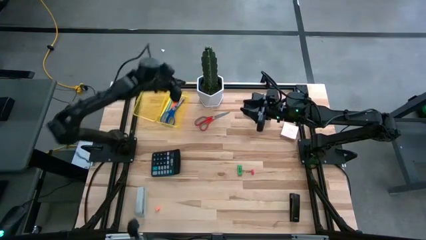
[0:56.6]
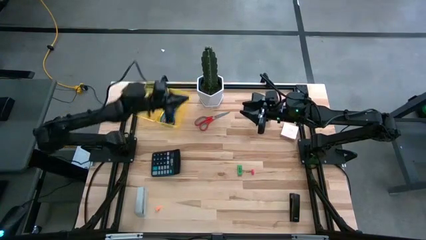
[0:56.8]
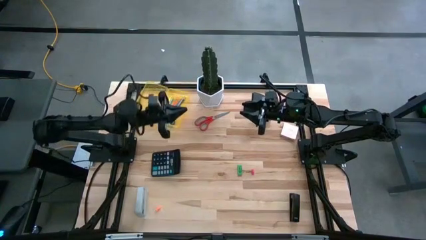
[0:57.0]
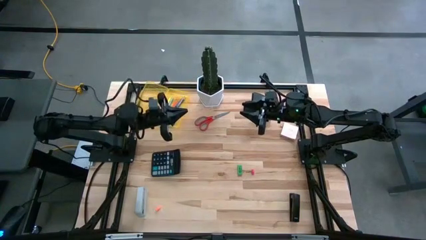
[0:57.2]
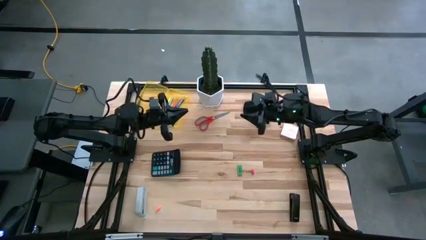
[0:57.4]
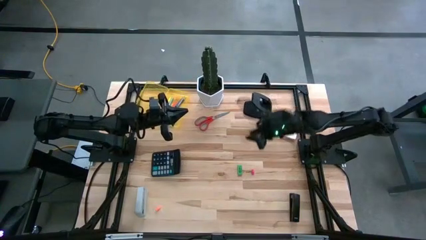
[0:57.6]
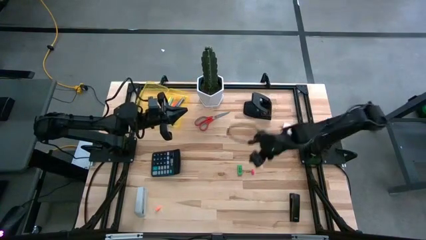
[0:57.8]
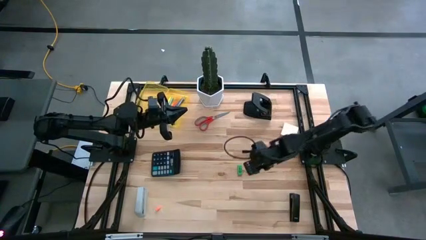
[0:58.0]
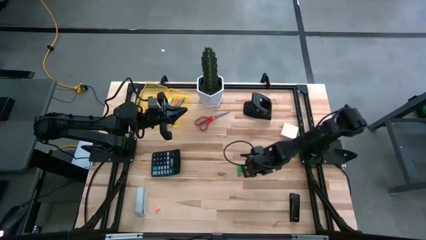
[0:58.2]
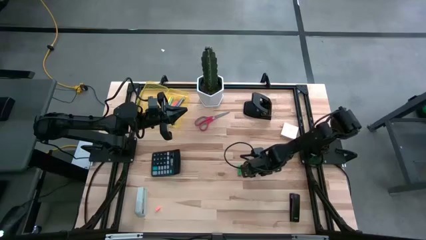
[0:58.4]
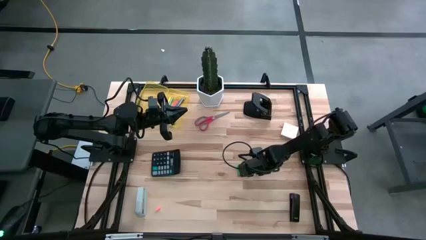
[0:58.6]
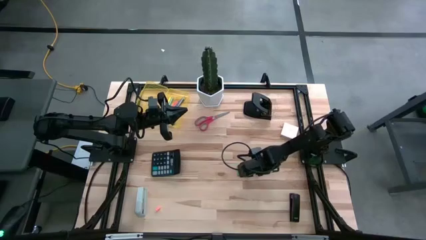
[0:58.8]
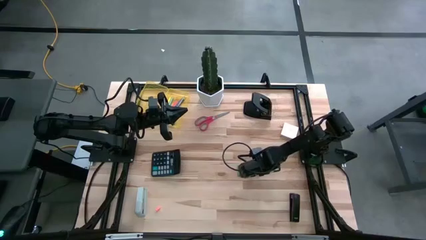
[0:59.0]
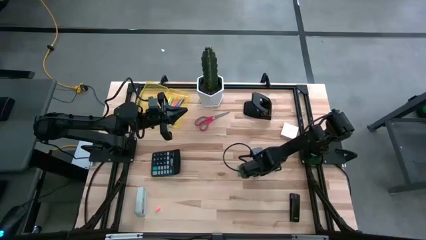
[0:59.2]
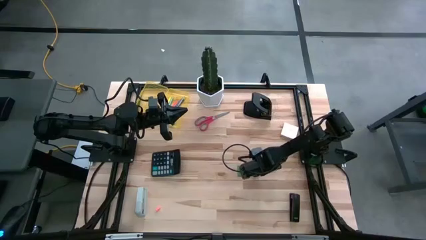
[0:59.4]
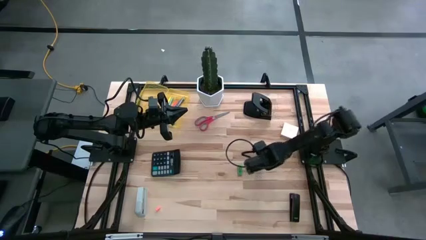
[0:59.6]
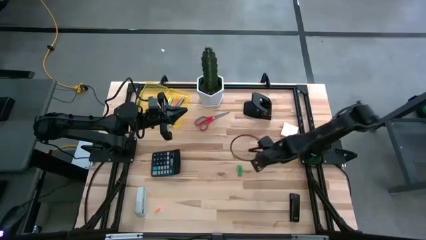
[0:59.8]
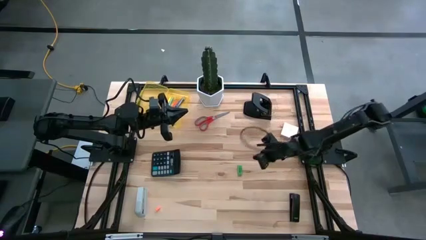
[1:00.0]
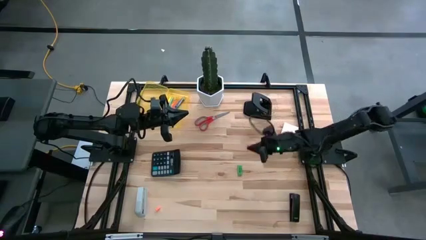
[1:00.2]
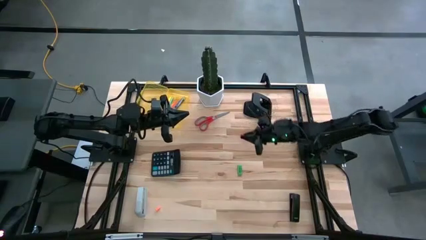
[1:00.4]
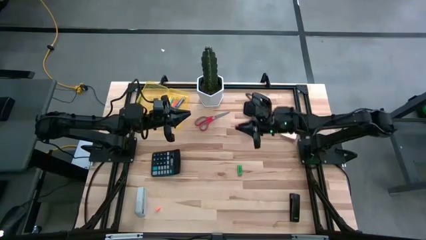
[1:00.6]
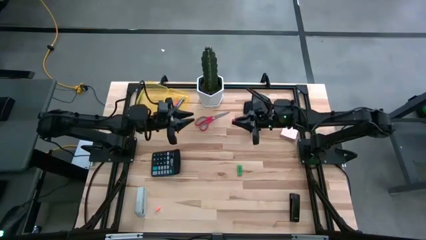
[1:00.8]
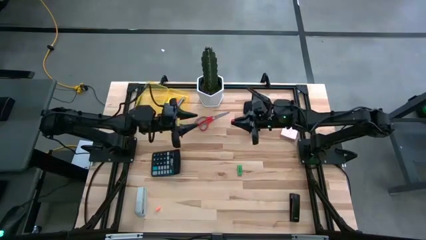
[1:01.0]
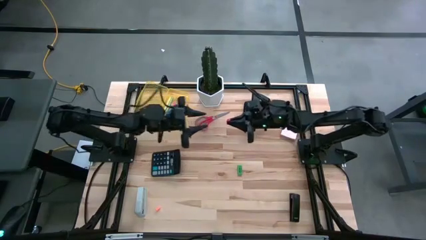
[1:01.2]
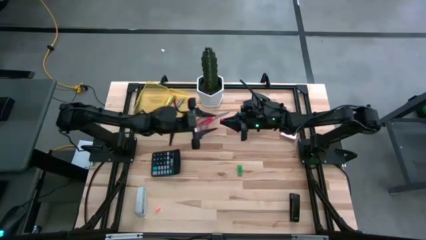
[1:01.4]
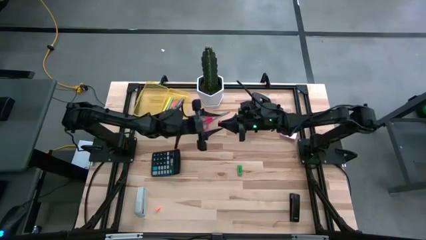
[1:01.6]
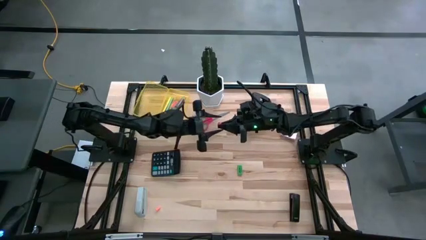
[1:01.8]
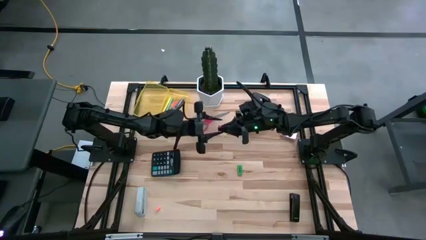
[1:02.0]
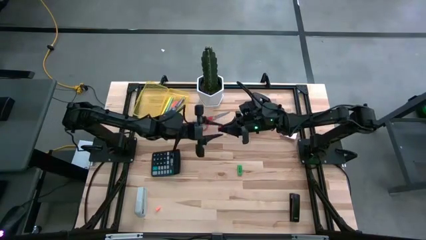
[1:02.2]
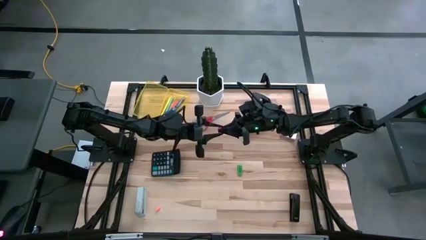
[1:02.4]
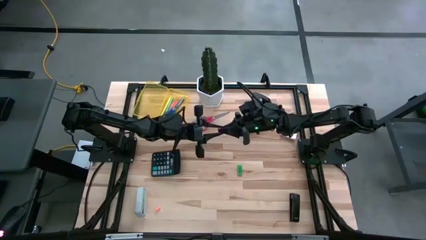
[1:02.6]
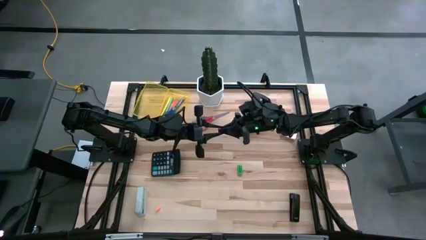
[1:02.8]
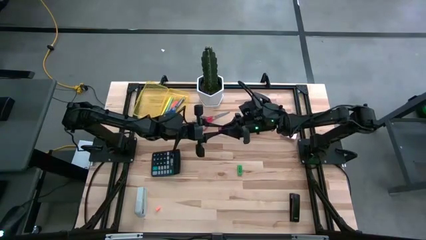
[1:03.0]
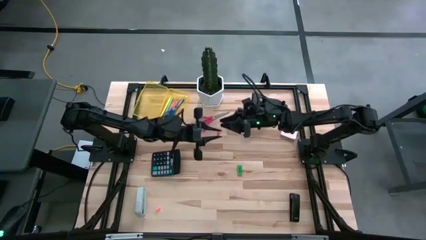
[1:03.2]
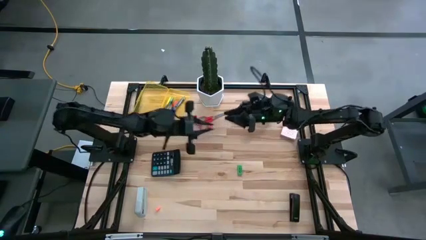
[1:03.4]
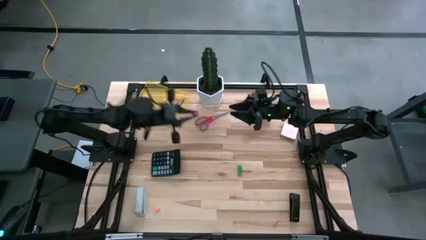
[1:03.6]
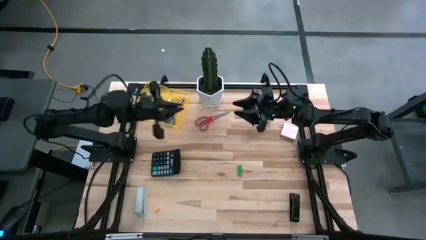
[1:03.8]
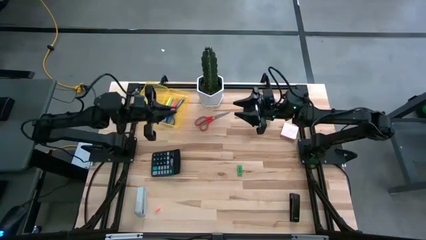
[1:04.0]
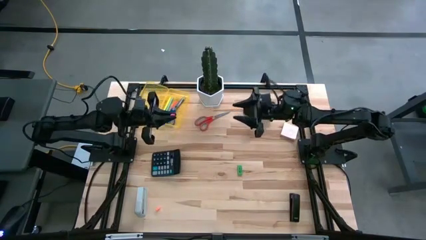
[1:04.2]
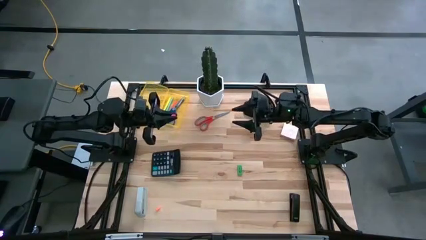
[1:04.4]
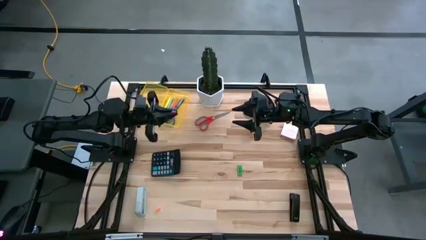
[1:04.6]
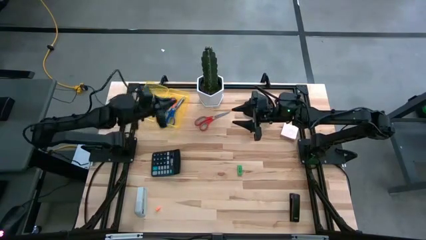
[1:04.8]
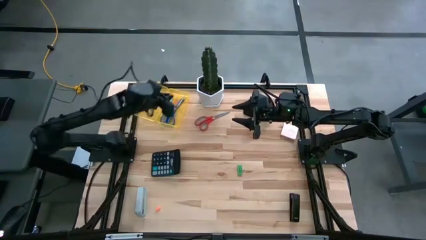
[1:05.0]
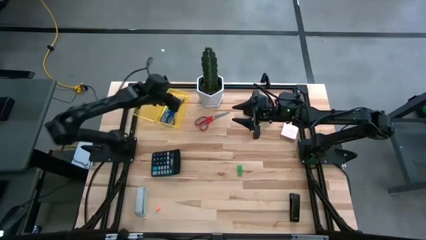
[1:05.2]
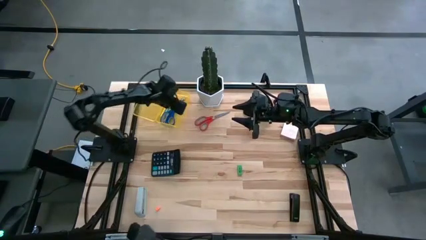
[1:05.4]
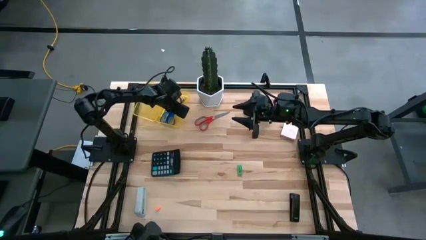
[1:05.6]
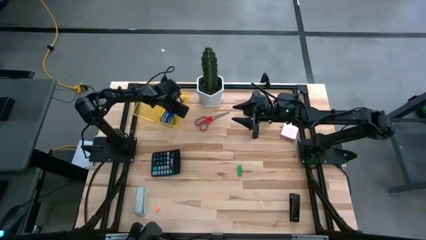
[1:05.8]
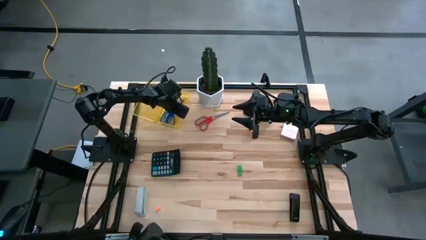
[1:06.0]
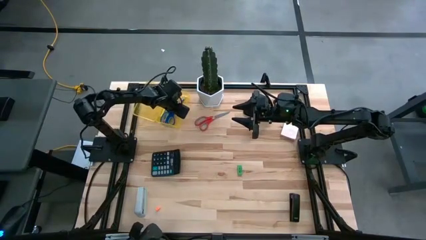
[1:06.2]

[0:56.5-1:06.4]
Task: Pack school essentials
Put the pink cap eraser into the transparent yellow supply box

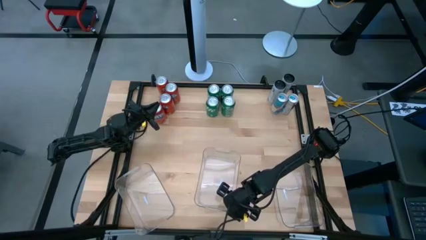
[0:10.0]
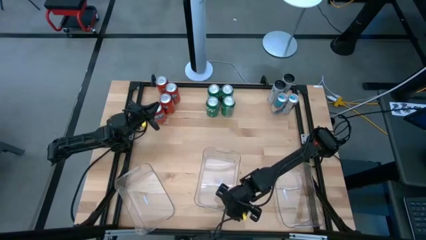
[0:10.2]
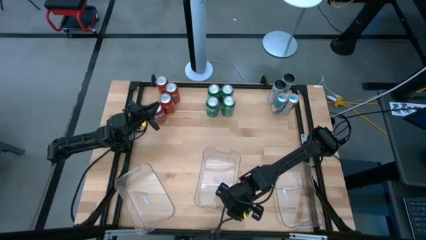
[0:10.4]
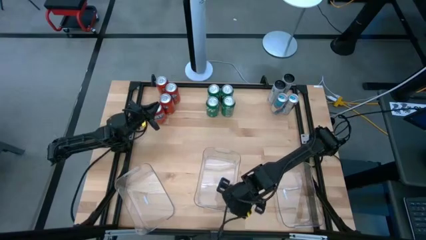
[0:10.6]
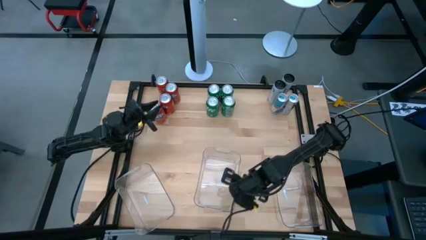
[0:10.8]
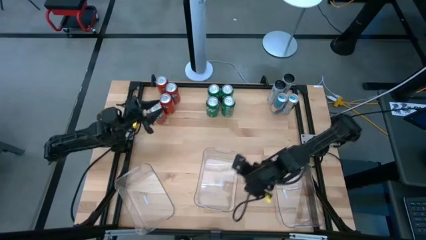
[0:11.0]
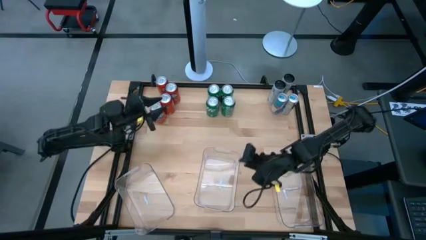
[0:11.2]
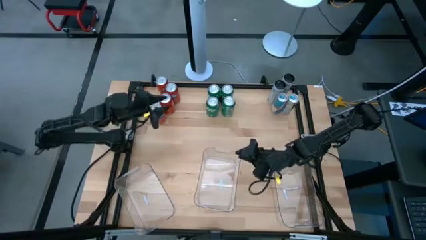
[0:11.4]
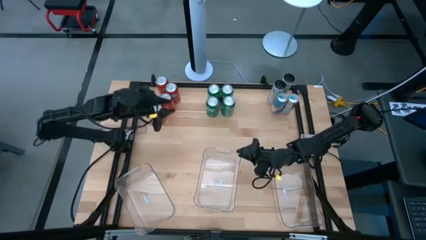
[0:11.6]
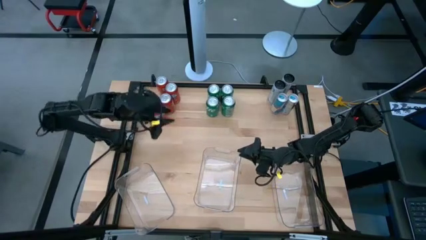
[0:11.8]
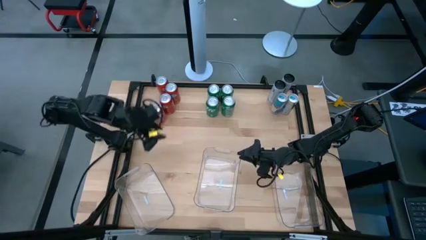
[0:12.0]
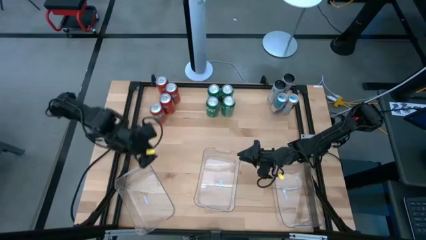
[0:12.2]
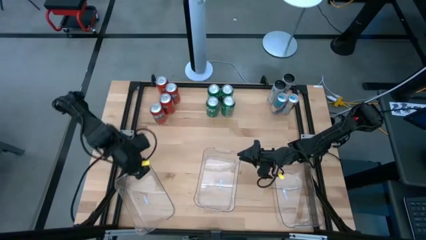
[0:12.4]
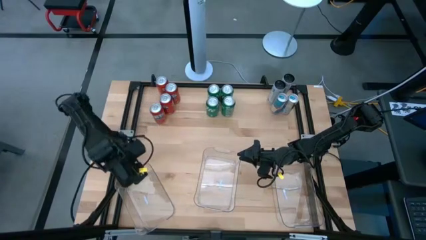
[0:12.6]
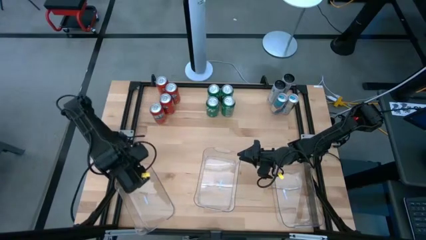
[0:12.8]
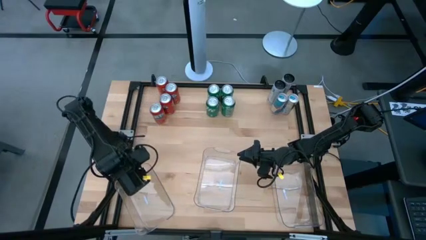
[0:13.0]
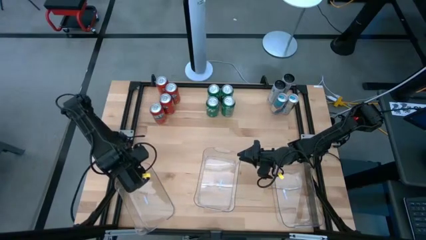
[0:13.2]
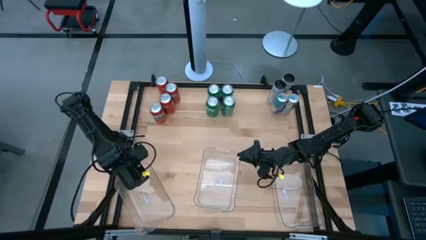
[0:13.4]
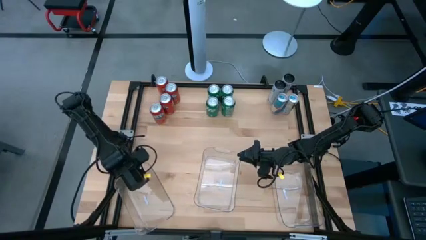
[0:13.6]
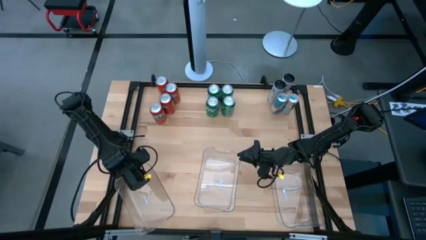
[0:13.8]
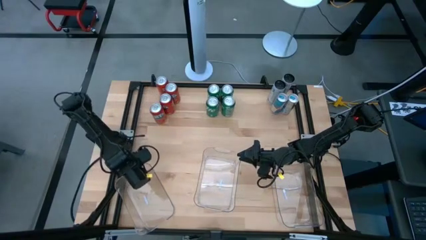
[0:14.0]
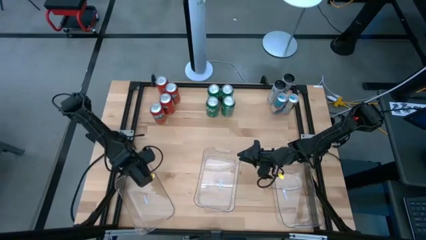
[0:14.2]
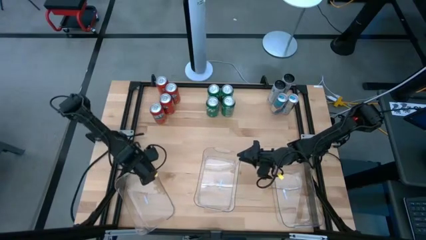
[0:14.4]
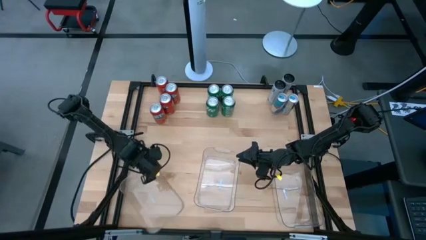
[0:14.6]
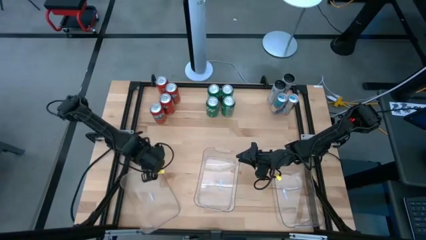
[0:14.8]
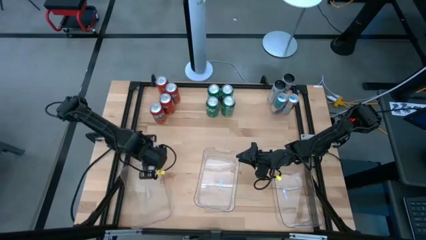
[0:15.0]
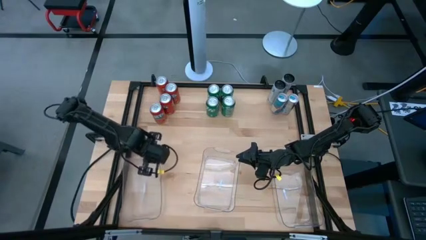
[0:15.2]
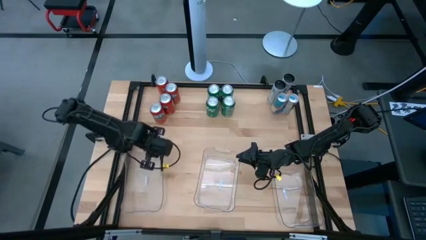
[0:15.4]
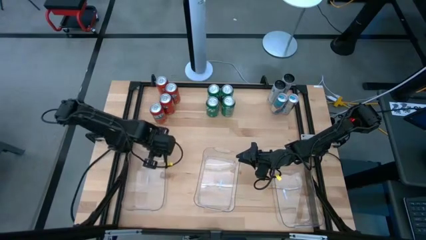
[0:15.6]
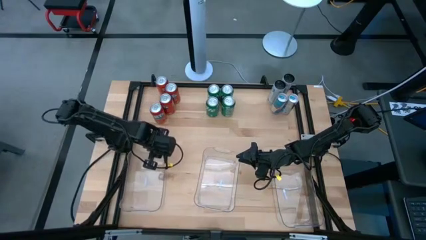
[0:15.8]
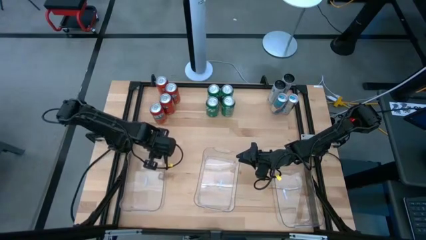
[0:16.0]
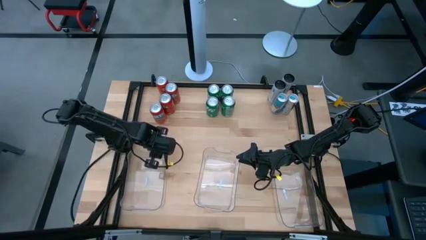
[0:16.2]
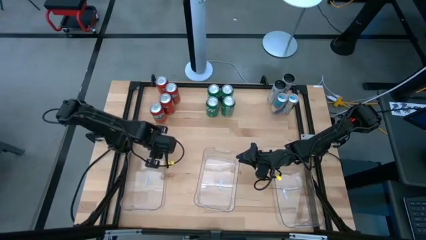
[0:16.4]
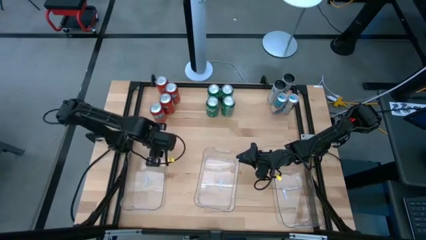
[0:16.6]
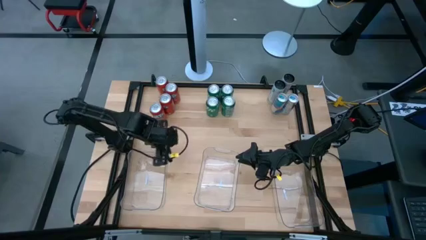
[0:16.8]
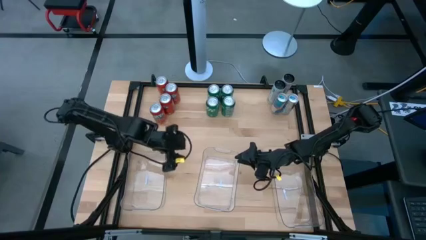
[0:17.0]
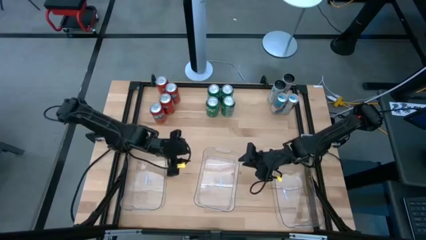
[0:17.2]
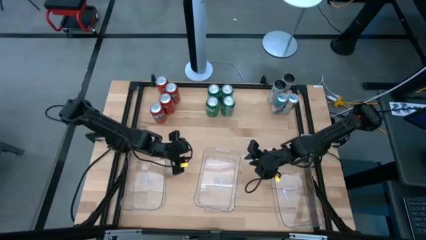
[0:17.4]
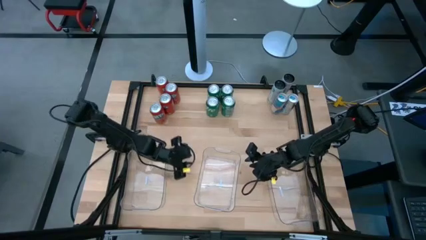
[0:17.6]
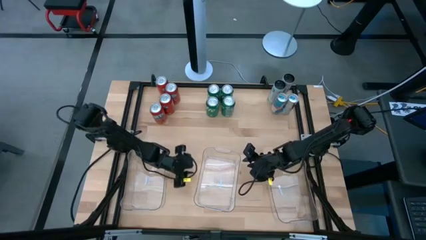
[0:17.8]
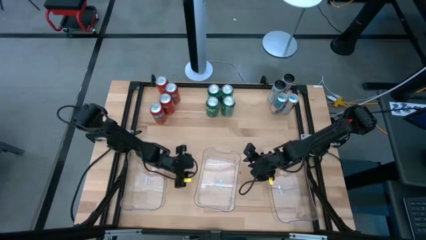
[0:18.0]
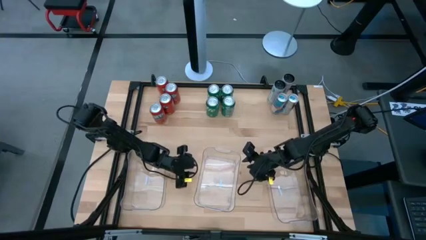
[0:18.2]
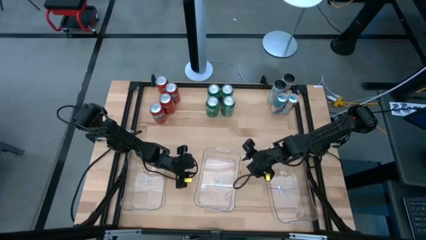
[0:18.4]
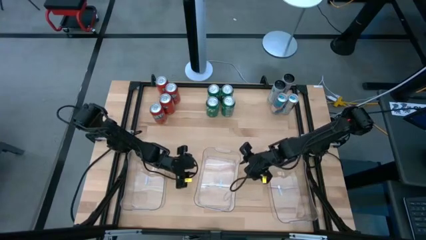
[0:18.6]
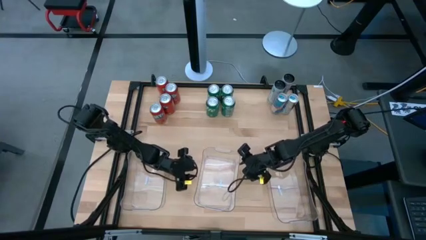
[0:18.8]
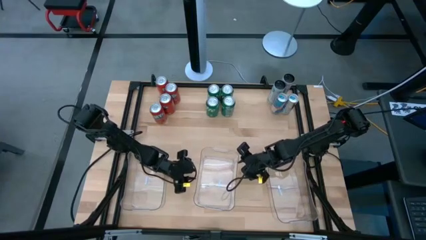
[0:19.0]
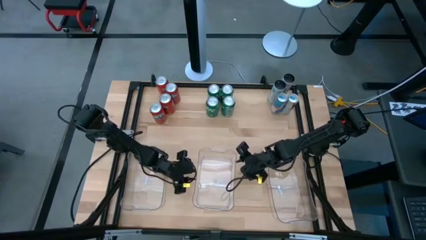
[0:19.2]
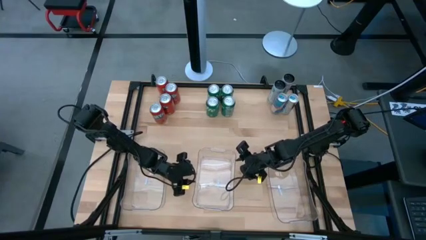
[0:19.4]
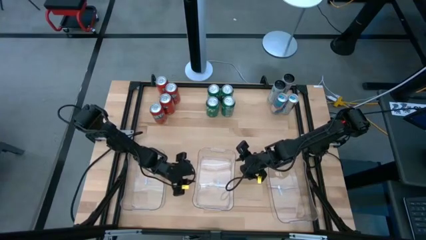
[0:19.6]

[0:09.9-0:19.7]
Task: Sort soda cans
Adjust the transparent bins
